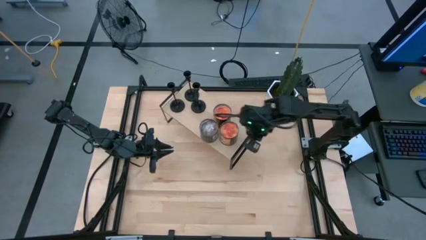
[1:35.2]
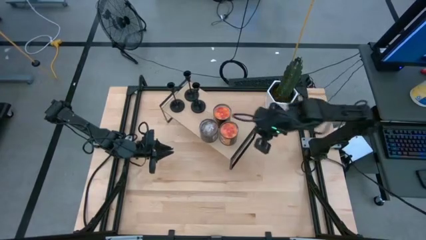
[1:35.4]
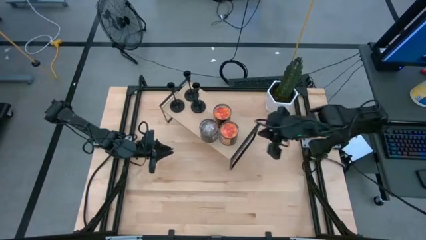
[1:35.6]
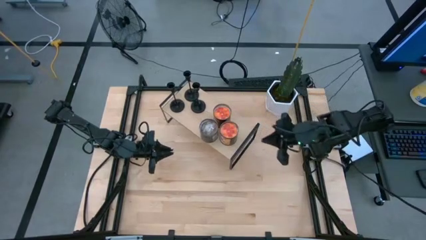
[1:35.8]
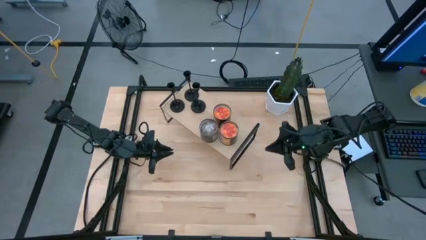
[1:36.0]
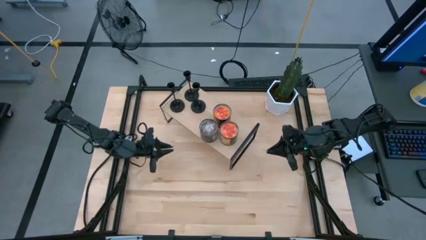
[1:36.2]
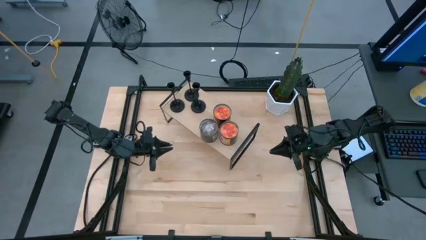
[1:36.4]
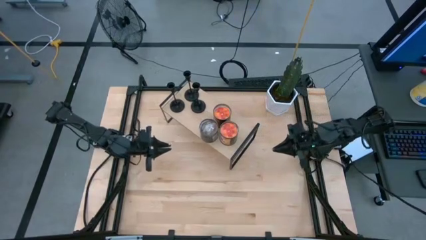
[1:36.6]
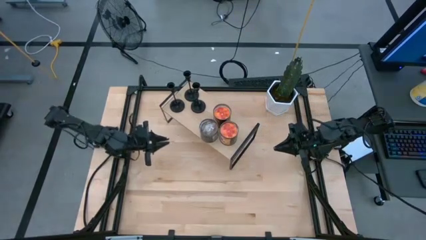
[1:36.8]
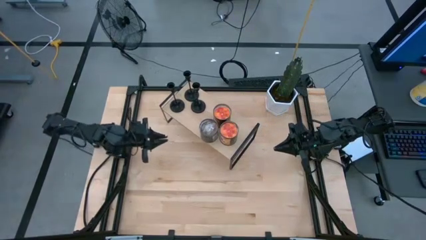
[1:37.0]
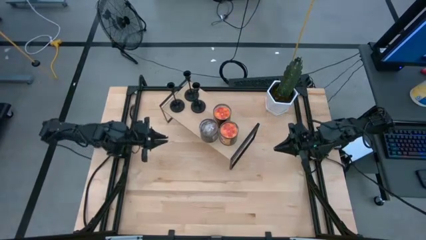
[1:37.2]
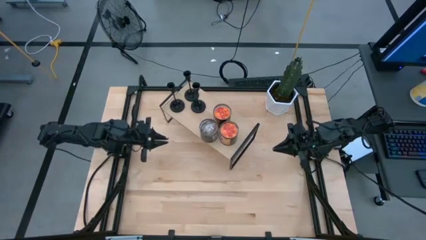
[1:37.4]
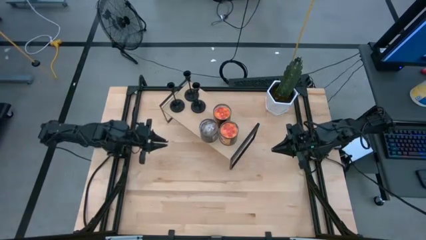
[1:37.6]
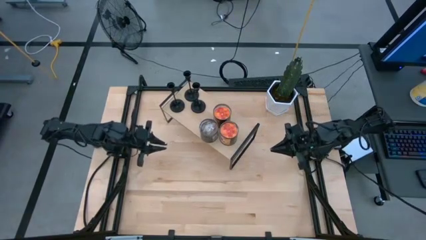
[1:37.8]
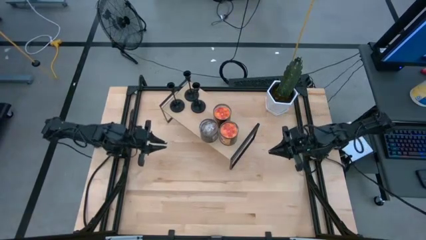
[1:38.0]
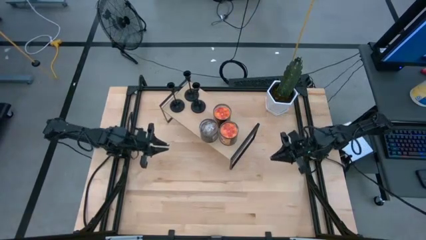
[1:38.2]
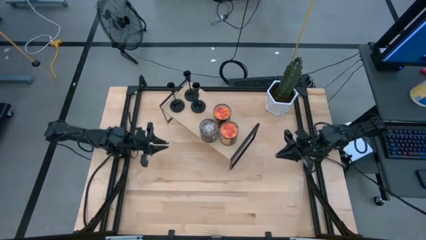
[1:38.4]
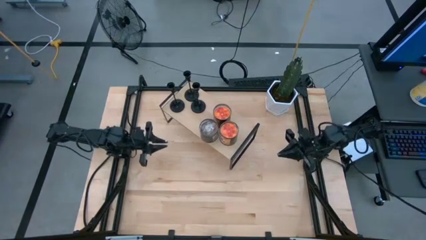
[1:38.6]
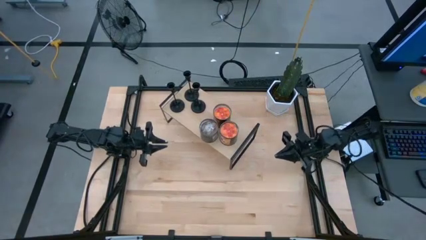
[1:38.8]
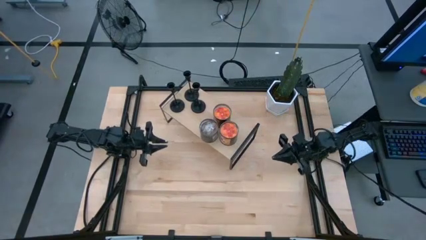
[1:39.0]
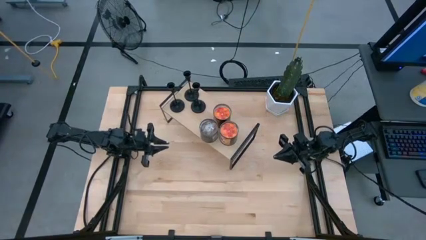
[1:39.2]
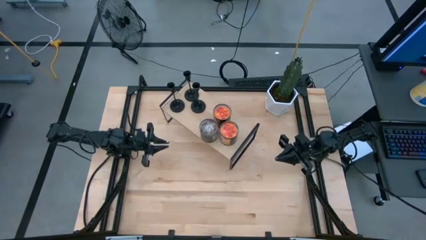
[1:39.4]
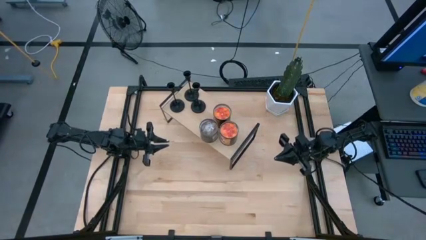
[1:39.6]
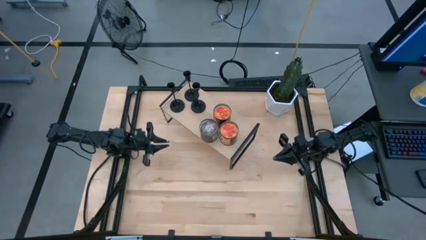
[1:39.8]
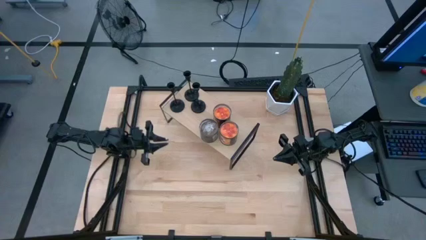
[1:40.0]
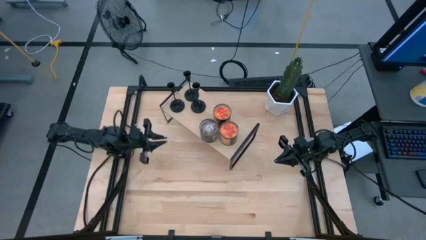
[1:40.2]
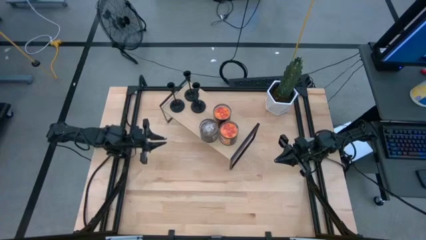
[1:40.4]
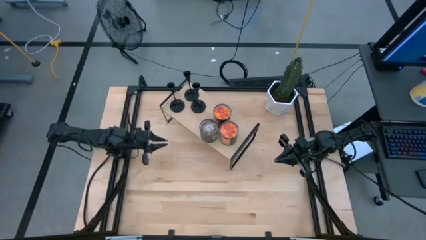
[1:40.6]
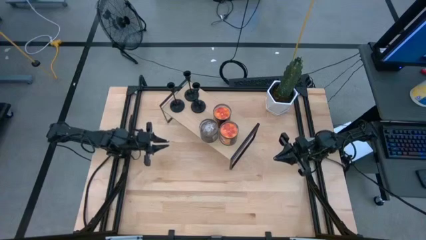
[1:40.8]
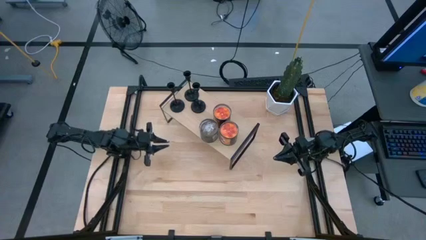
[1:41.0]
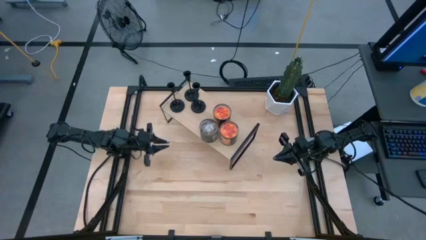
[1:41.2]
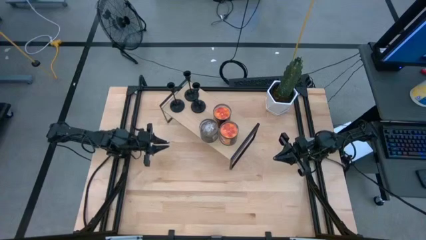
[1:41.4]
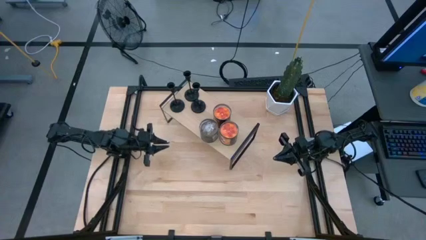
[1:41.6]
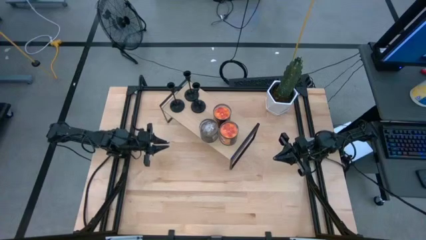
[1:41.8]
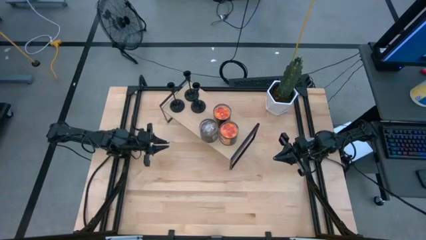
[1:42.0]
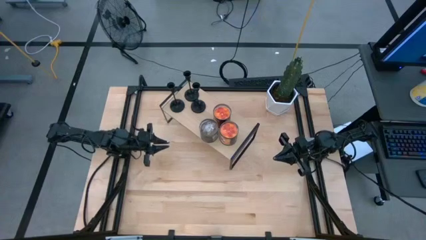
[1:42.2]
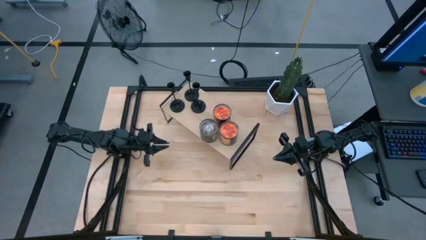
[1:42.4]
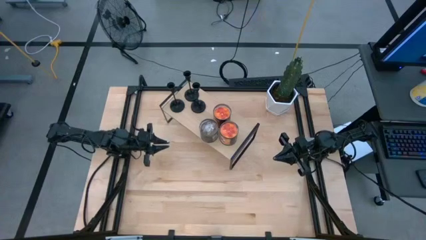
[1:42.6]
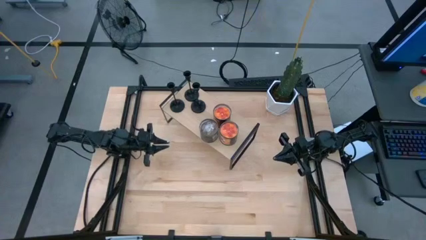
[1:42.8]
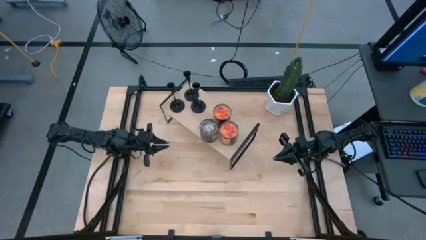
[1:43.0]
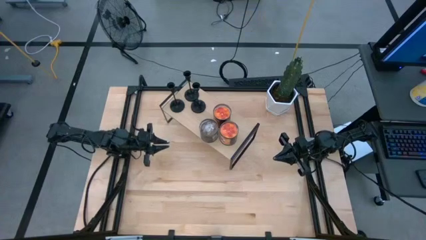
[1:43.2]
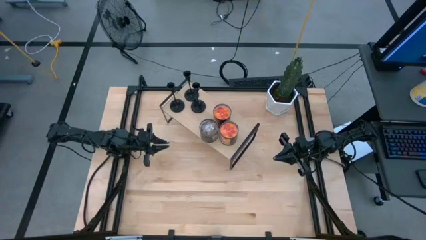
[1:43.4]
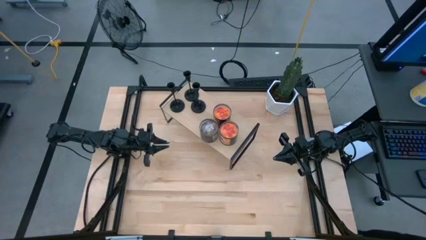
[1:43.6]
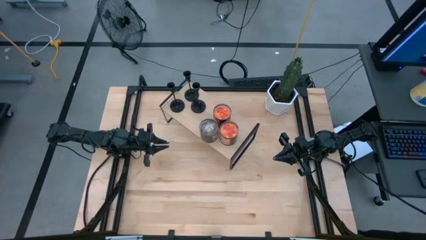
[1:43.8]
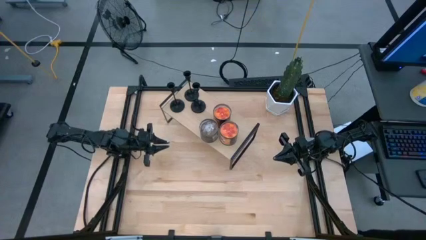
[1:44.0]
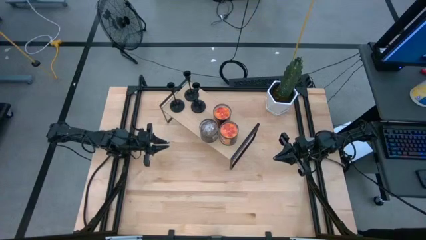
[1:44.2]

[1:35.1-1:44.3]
Task: Pick & Place candle stick holders
Return to Home Position

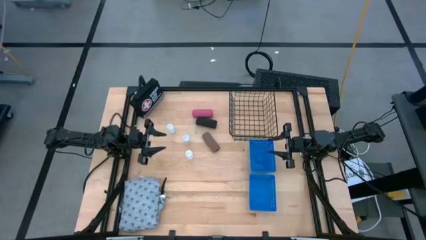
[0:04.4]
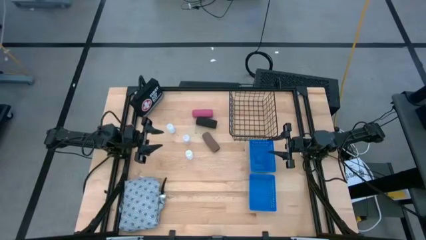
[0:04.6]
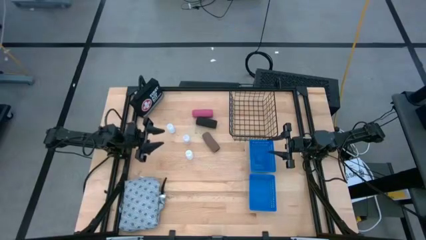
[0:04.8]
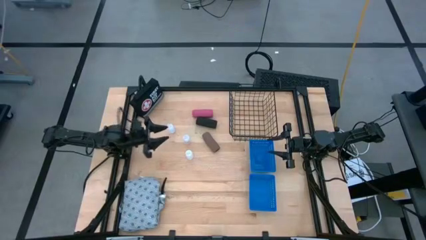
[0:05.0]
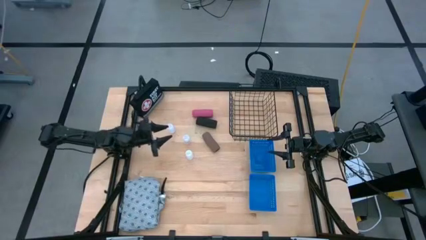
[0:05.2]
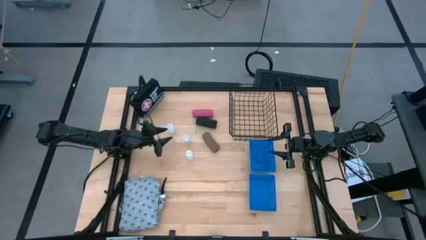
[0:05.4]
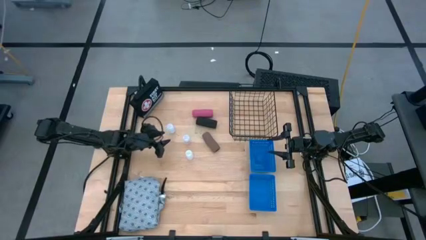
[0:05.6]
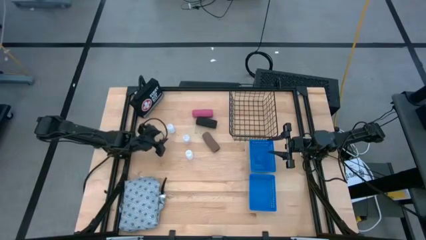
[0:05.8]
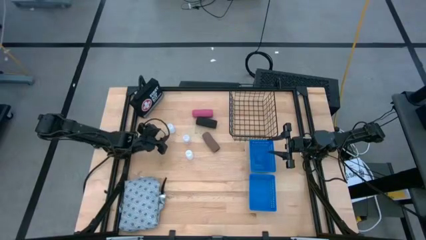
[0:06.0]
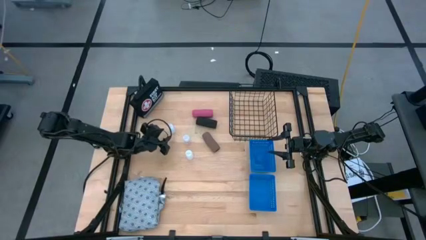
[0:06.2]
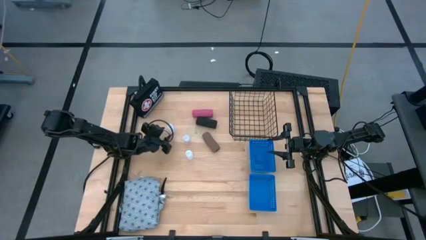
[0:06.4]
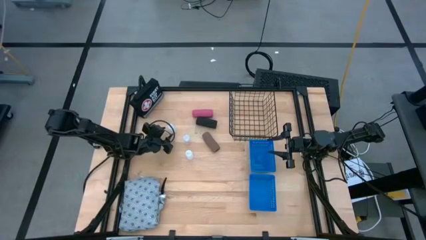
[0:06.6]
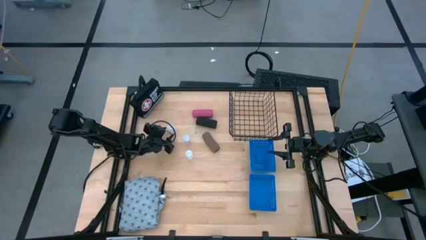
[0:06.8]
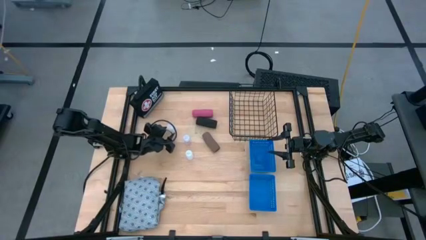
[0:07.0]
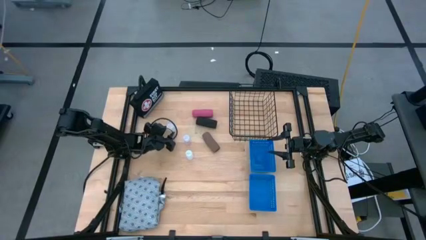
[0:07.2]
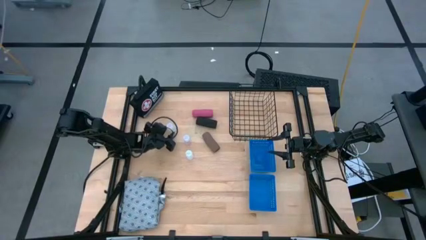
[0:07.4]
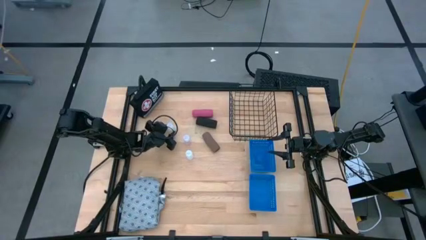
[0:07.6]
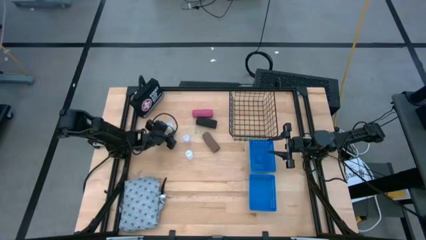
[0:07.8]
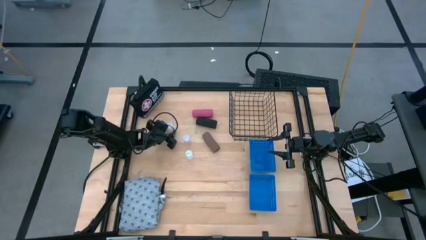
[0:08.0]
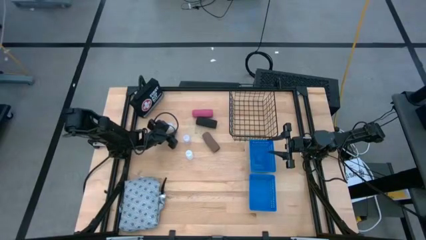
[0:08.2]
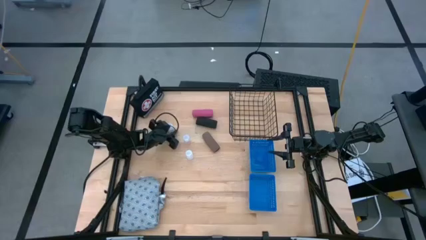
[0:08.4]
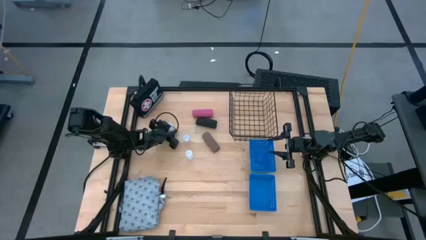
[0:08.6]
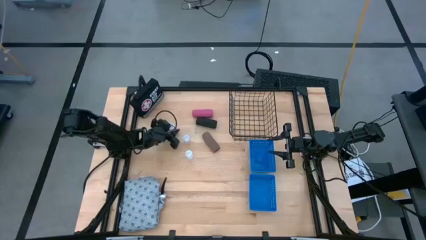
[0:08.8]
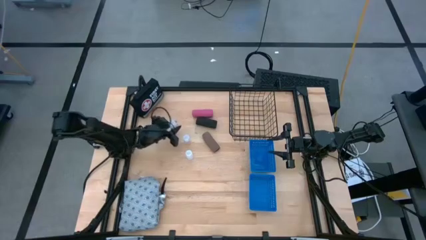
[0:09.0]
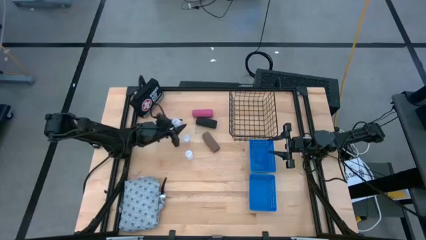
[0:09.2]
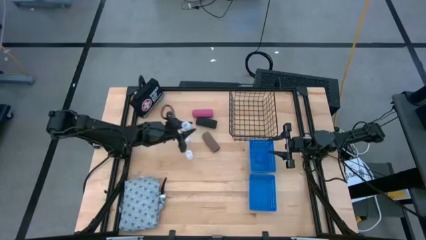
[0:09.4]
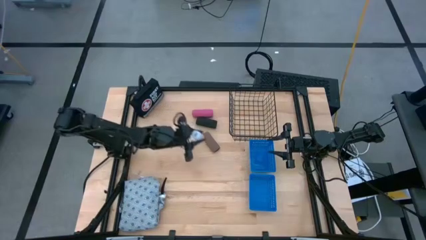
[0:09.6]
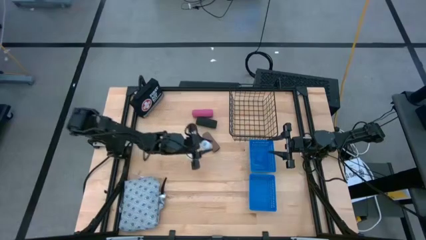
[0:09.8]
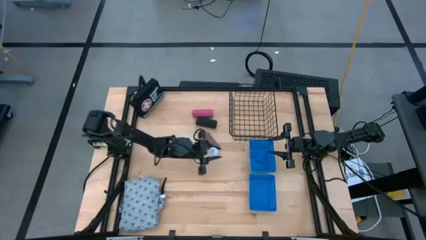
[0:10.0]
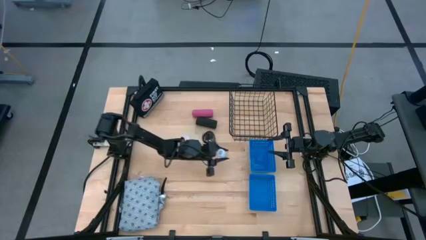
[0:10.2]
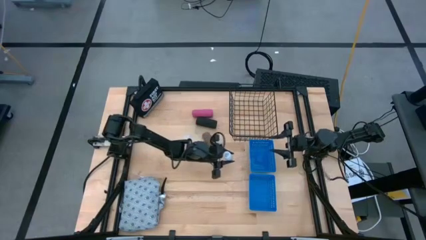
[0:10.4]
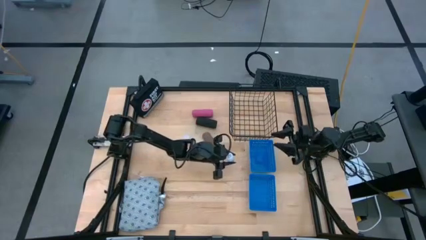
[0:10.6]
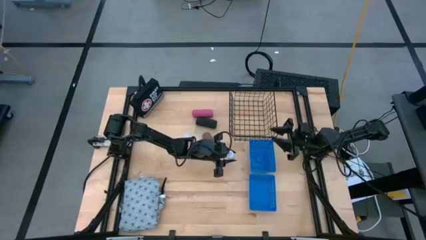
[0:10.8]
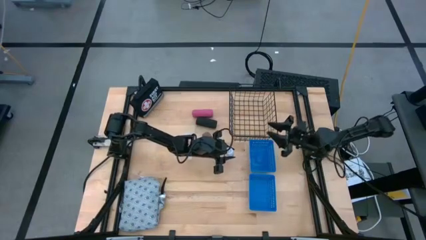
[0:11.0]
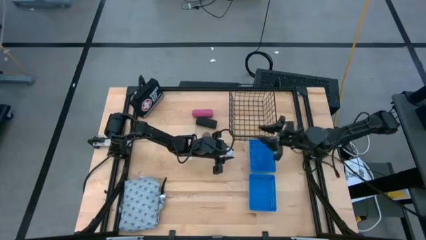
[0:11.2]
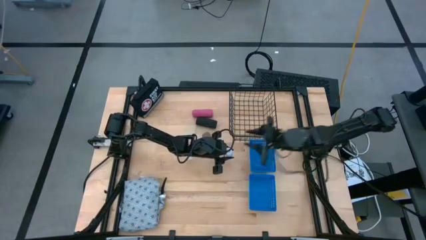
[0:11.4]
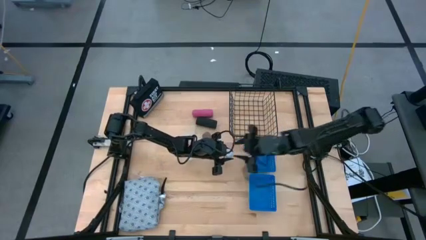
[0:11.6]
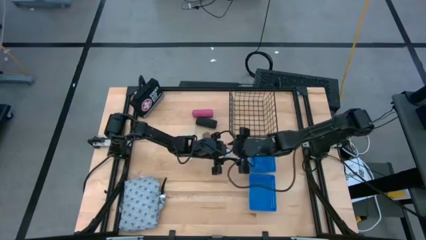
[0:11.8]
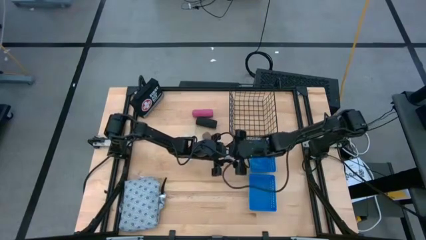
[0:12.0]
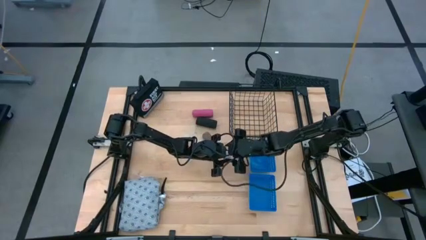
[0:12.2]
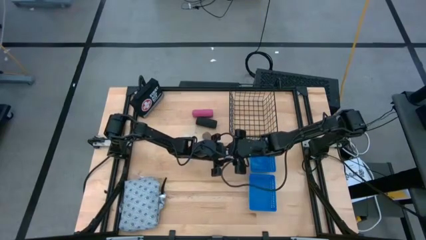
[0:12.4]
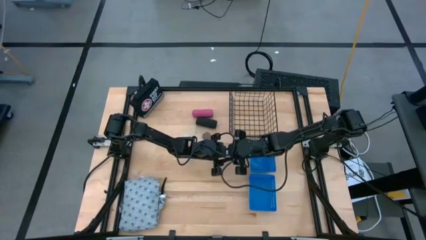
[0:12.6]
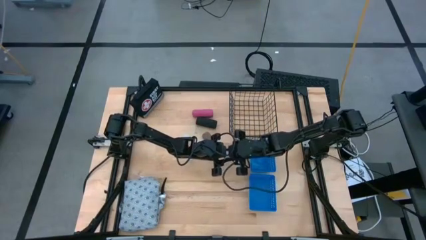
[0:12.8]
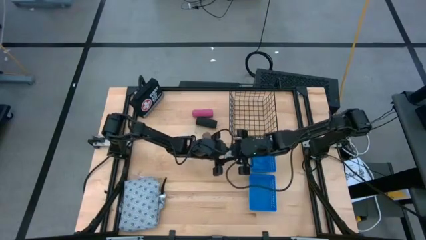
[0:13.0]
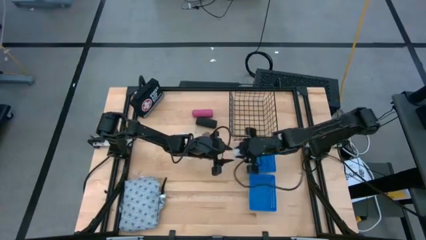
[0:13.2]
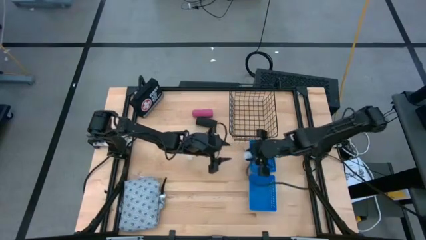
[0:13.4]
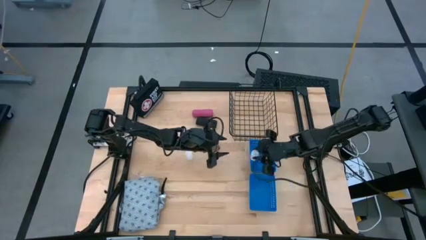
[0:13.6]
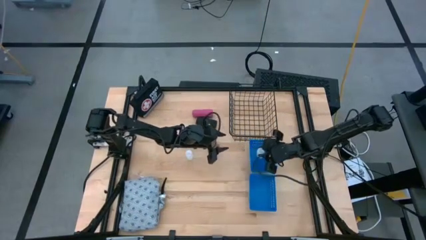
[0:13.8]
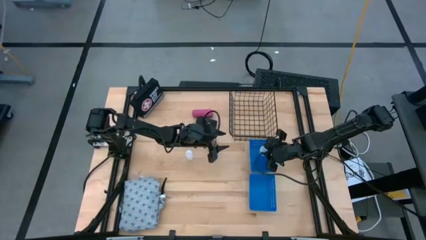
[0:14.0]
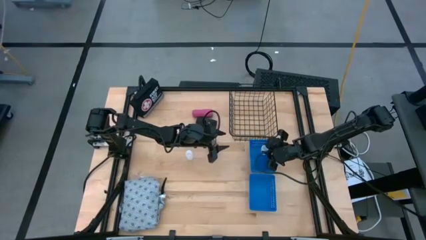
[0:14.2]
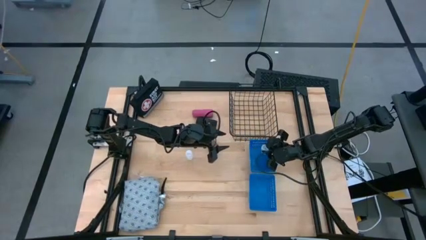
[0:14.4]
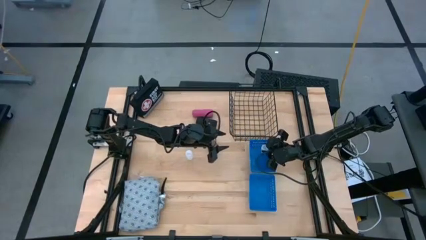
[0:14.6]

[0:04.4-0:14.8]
Task: Pick & Place Medicine items
Put the top transparent pill bottle into the top blue basket
